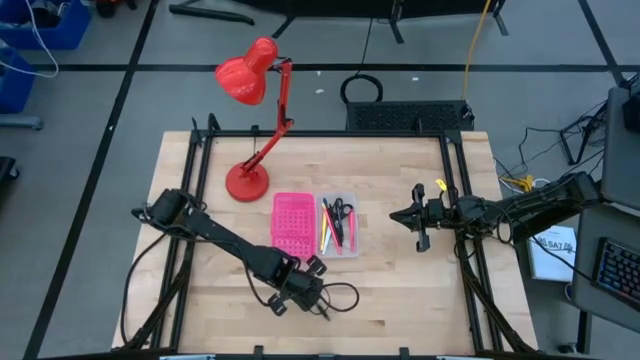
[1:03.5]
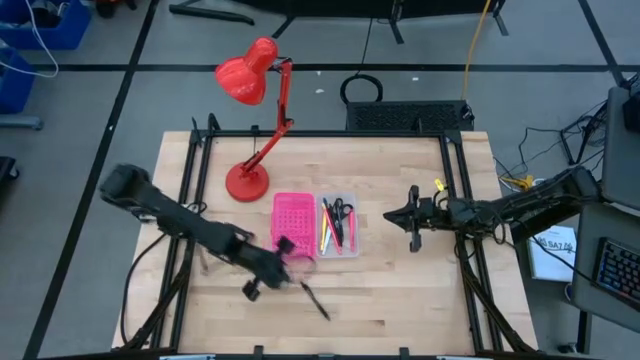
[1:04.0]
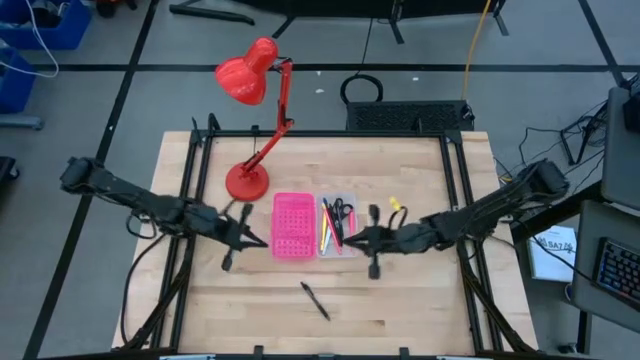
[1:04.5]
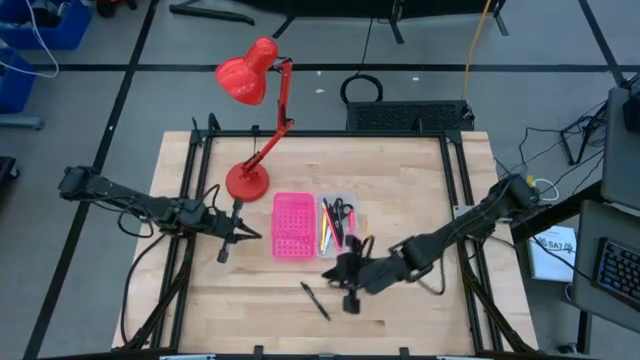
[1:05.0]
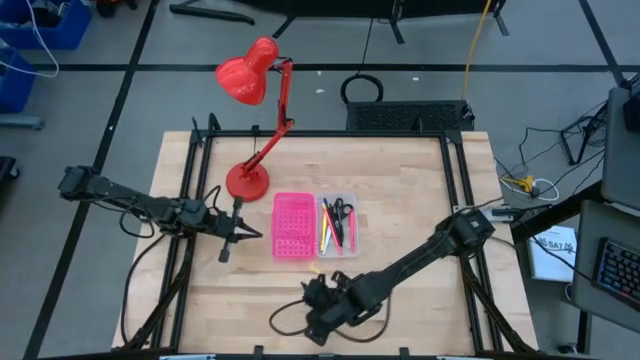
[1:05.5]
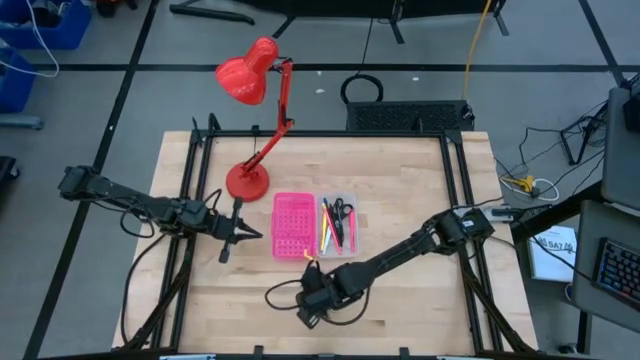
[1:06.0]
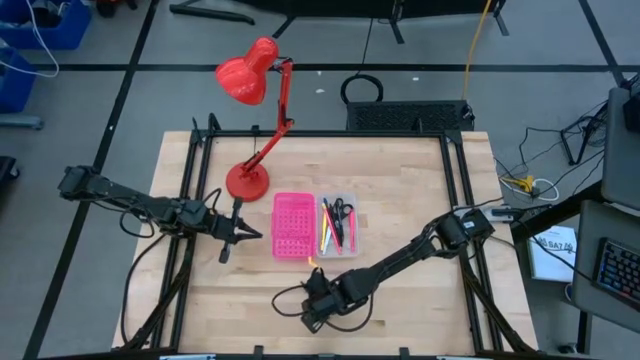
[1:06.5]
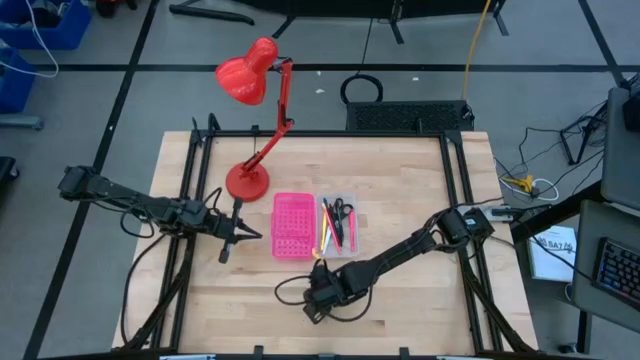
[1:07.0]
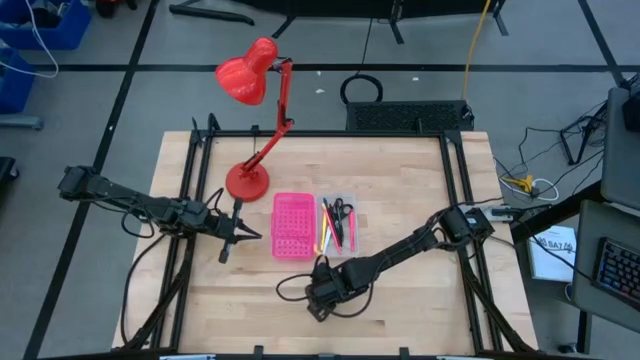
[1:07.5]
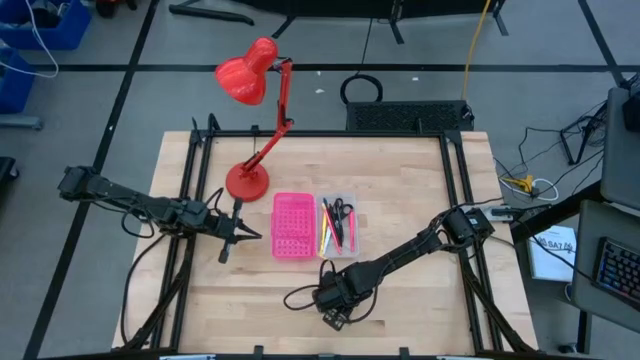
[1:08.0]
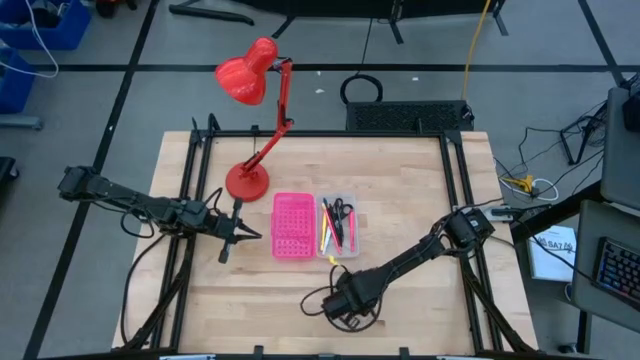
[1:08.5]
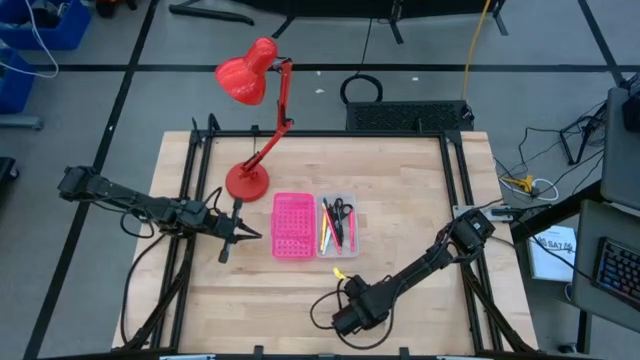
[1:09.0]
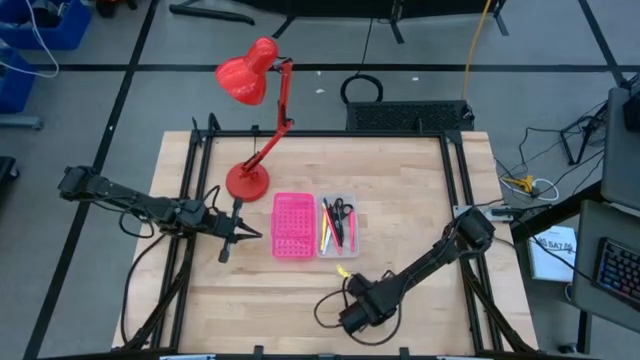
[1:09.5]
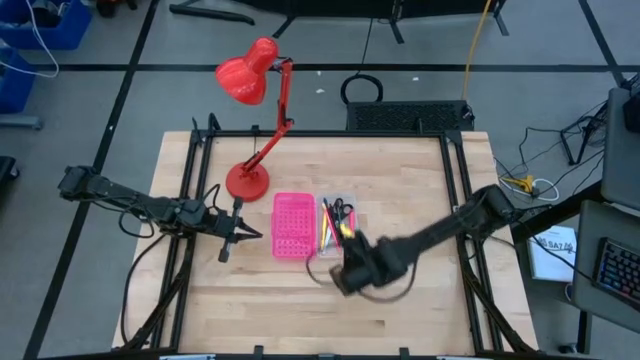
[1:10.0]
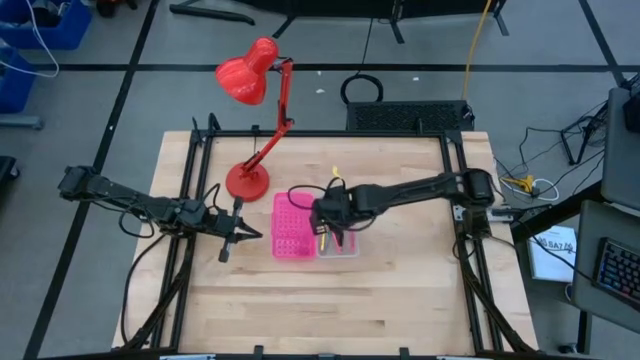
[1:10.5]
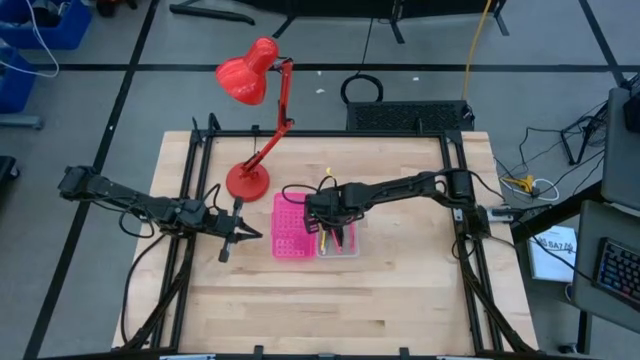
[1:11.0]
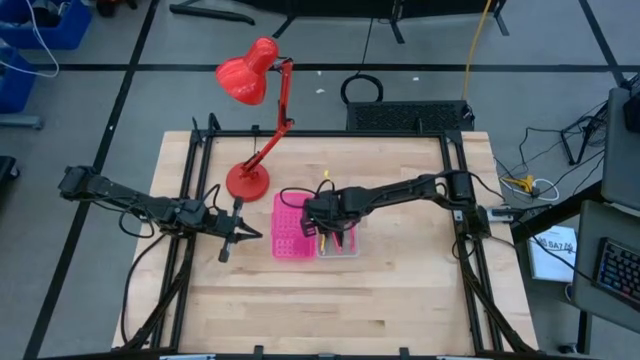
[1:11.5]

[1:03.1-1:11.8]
Task: Pick & place school supplies into a supply box
Put the black pen into the supply box

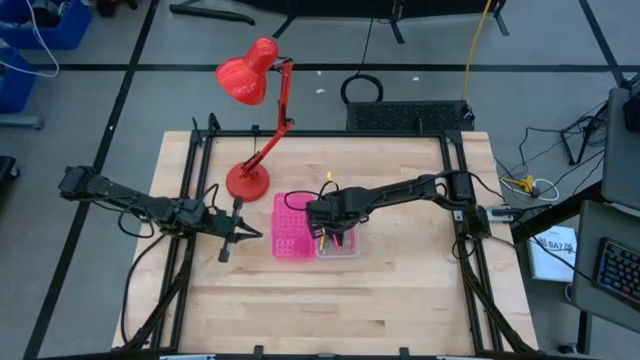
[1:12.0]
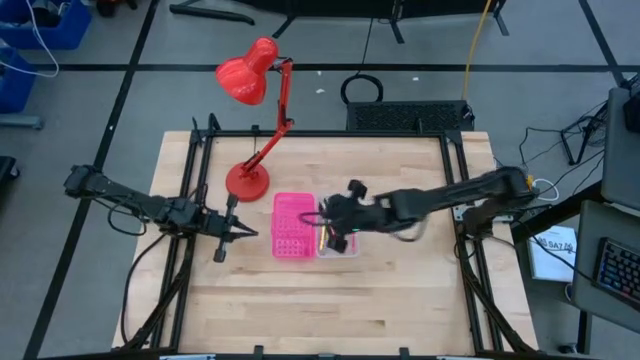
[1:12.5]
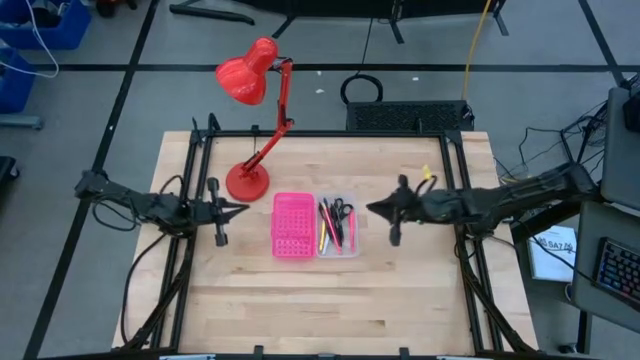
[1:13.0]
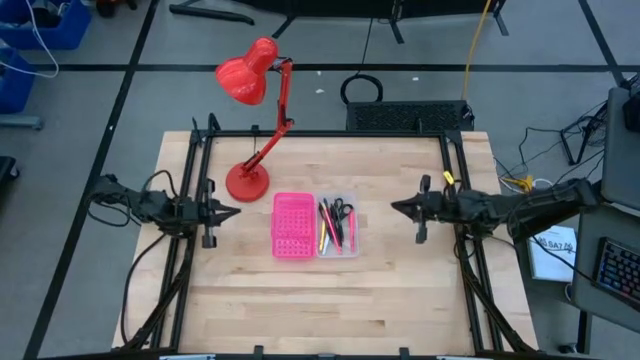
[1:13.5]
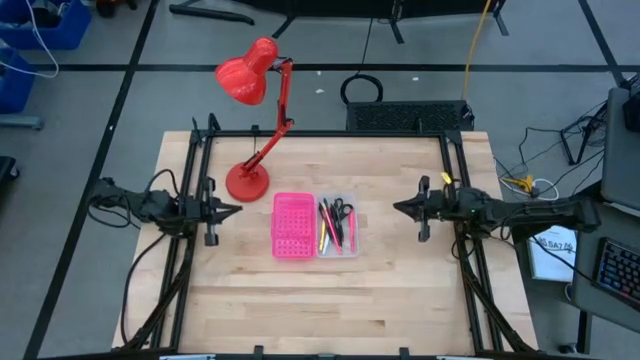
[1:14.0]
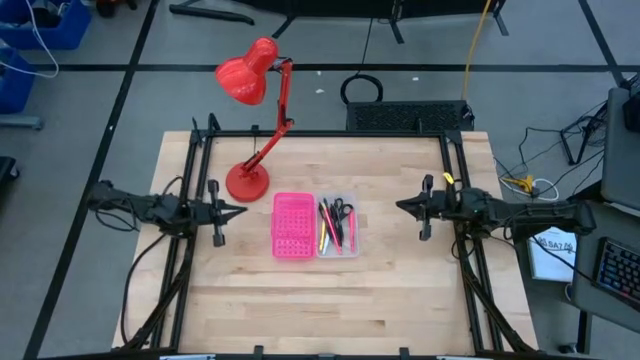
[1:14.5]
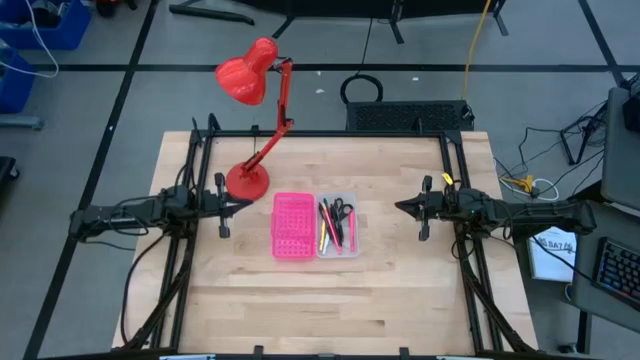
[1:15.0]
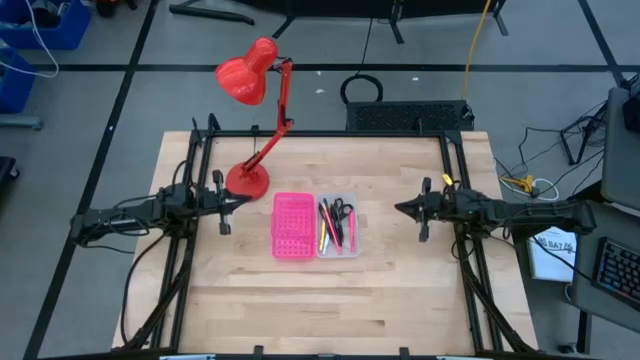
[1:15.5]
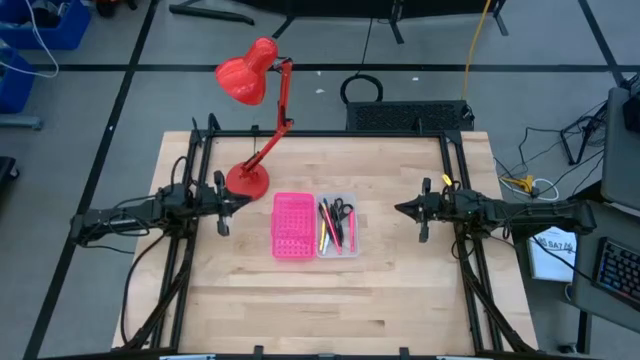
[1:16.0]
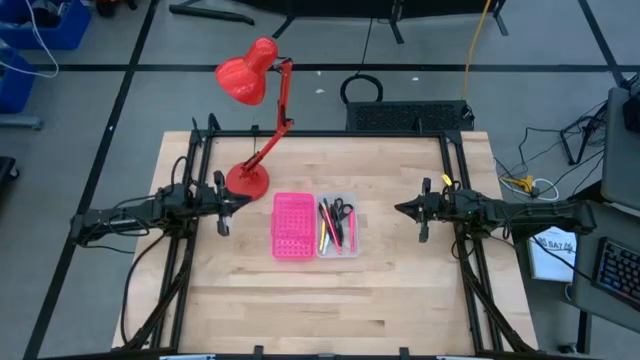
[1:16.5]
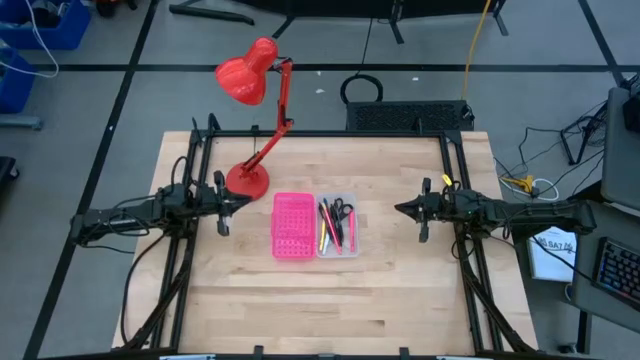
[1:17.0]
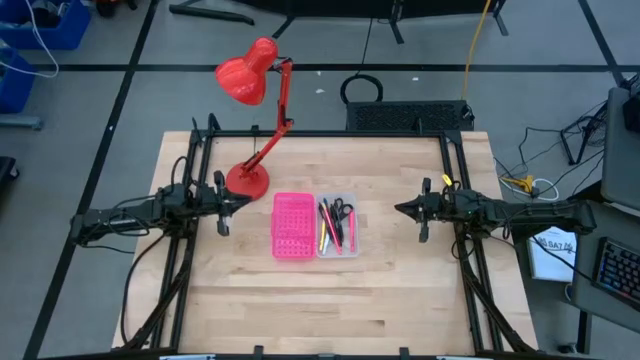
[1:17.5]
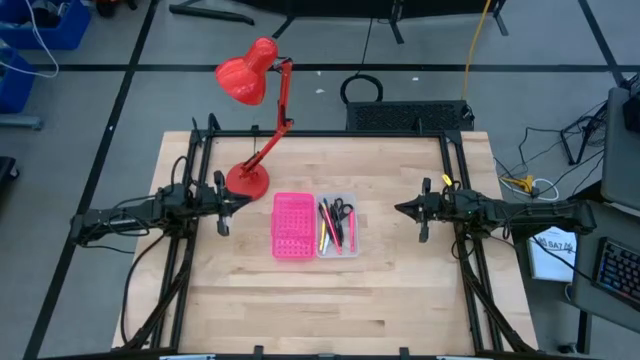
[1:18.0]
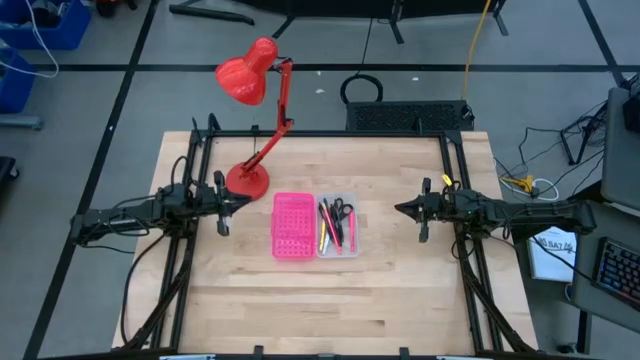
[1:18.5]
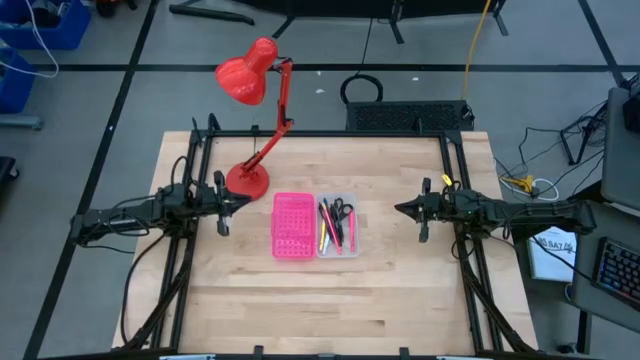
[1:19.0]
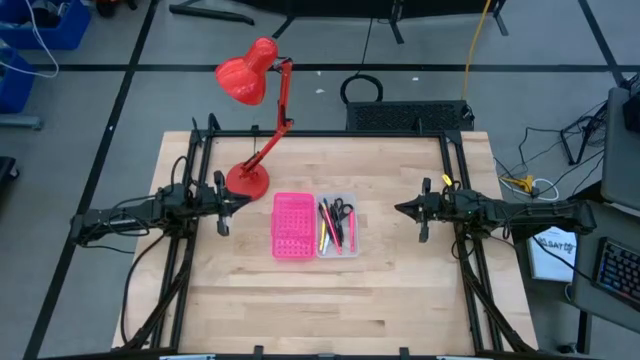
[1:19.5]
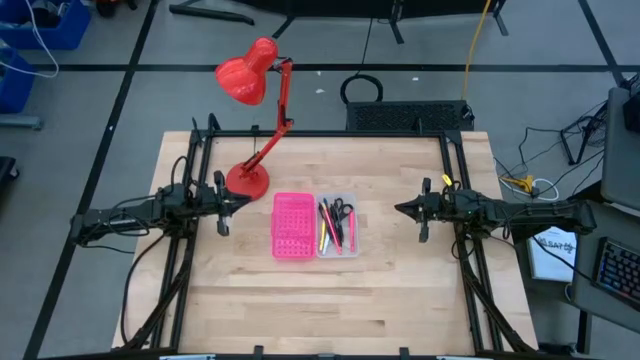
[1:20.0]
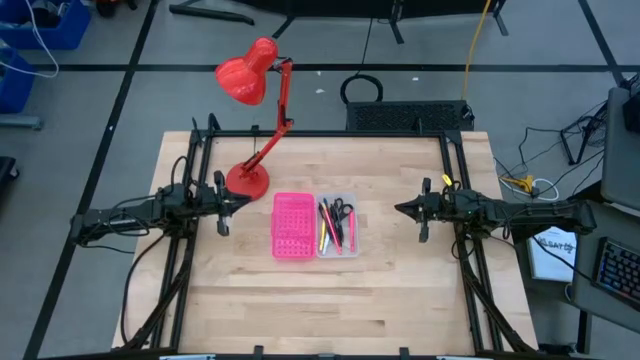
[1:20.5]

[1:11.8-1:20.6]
Return to Home Position

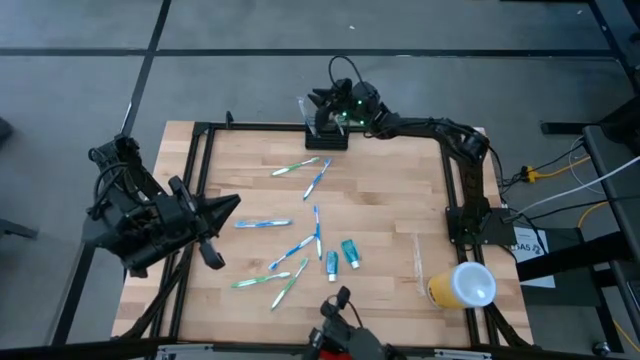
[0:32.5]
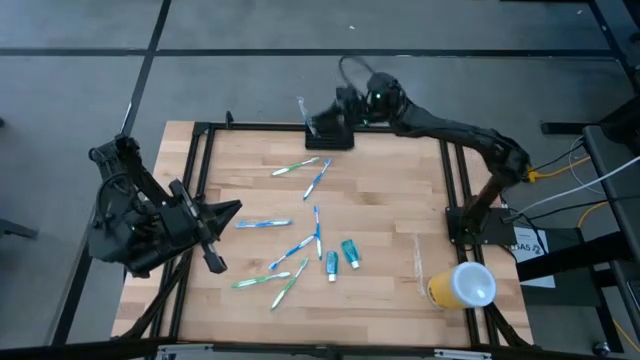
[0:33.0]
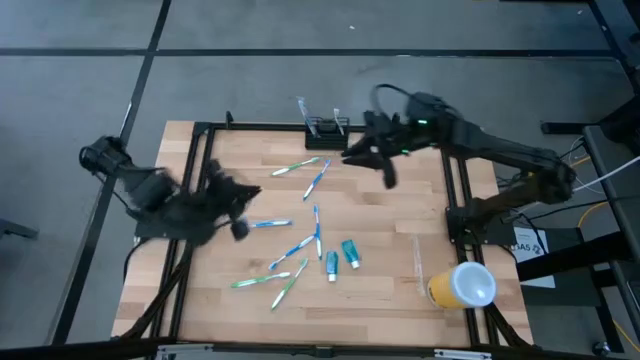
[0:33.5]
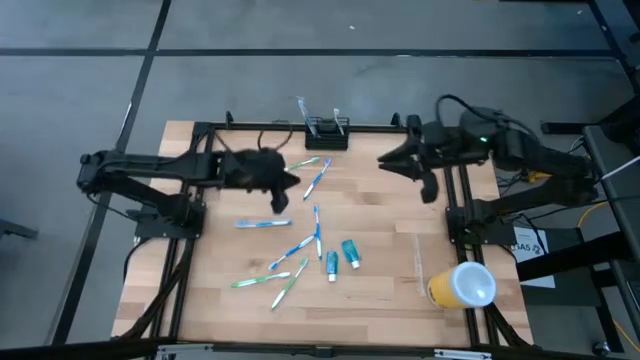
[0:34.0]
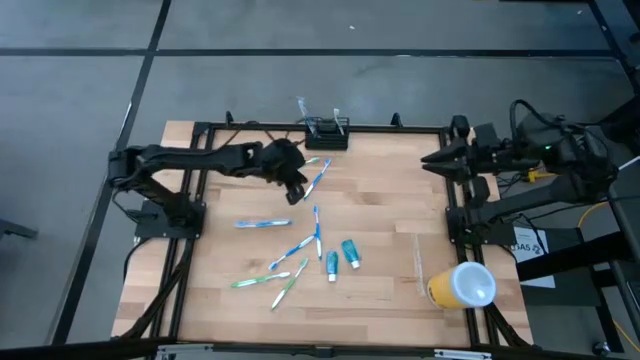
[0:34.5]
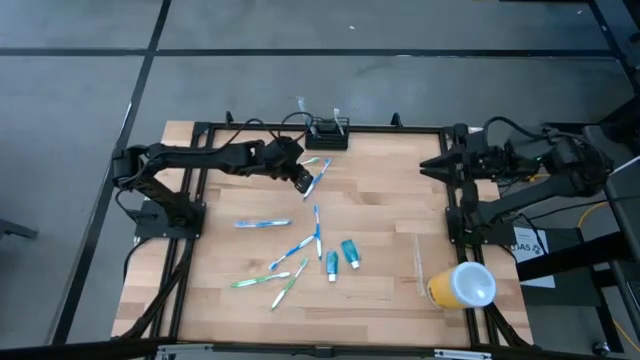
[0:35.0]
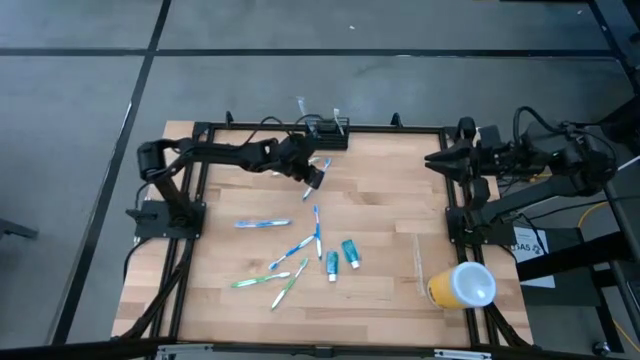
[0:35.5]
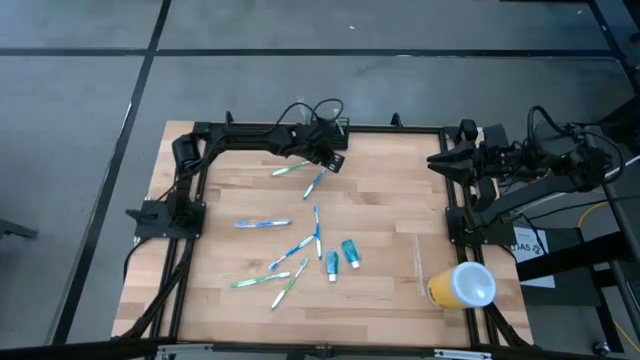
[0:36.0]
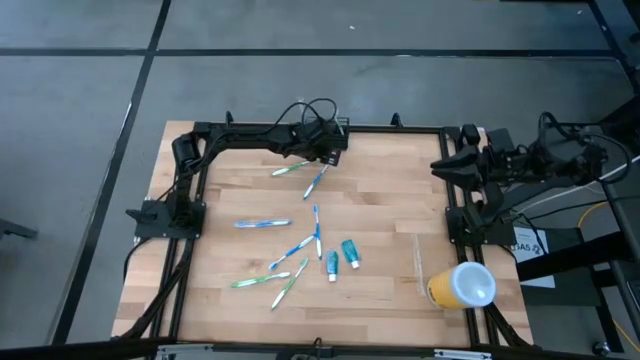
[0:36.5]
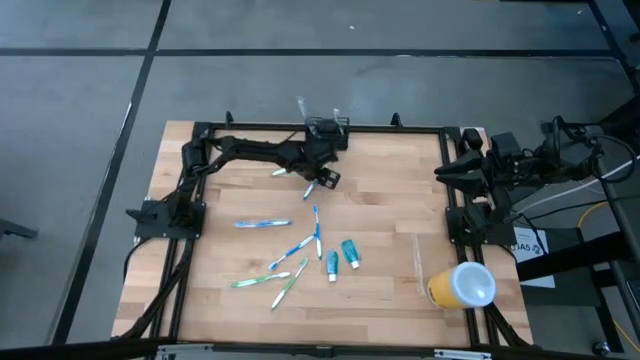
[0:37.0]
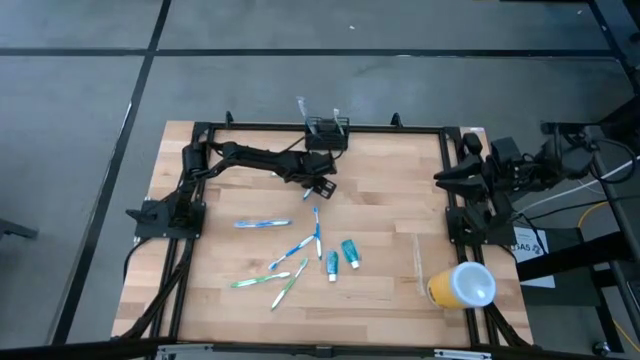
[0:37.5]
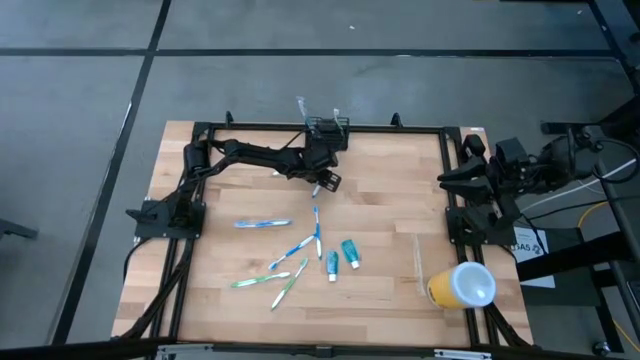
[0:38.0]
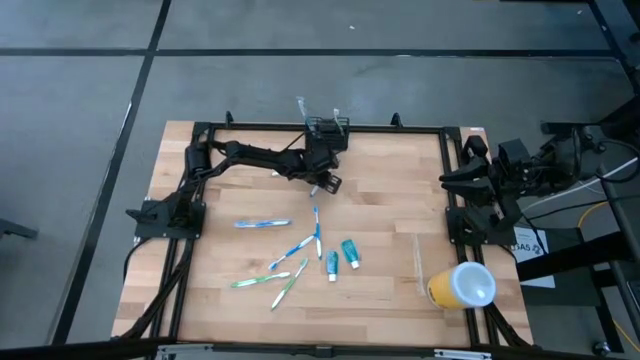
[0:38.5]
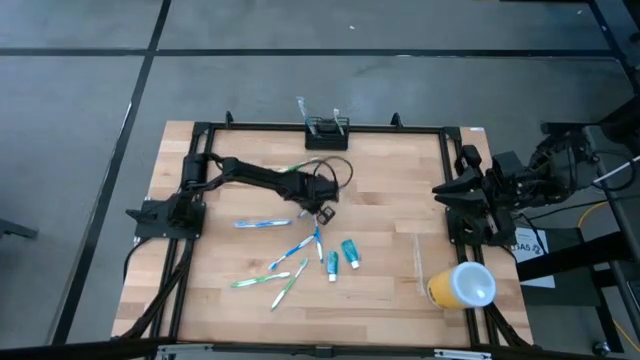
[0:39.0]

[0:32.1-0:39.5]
Task: Pick & Place toothbrushing station
Put the blue toothbrush into the wire organizer
